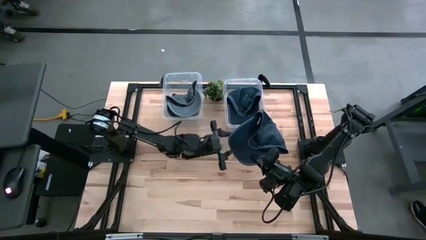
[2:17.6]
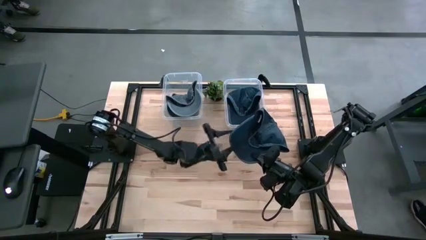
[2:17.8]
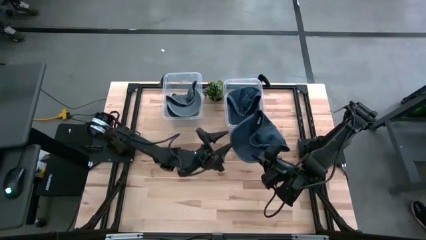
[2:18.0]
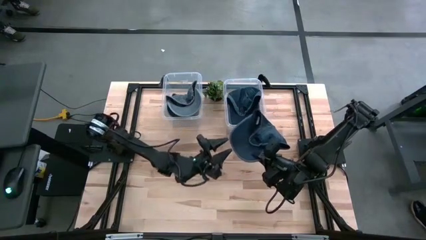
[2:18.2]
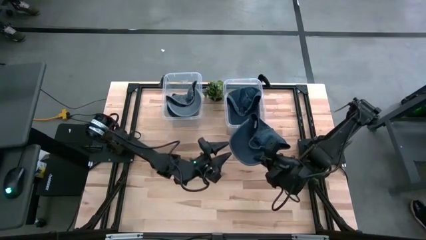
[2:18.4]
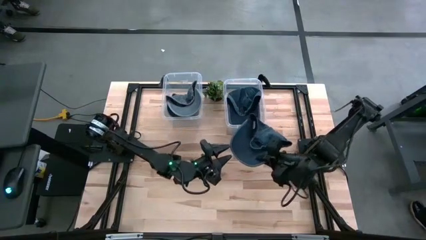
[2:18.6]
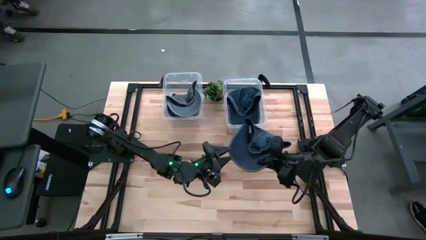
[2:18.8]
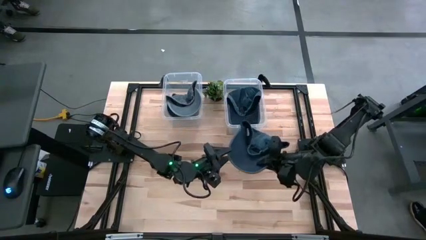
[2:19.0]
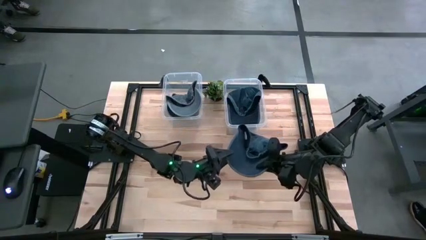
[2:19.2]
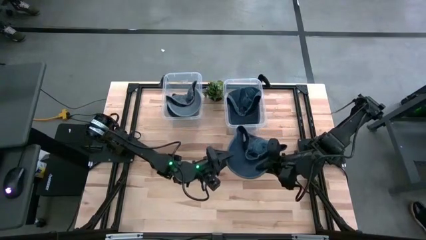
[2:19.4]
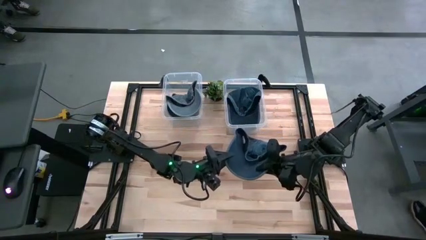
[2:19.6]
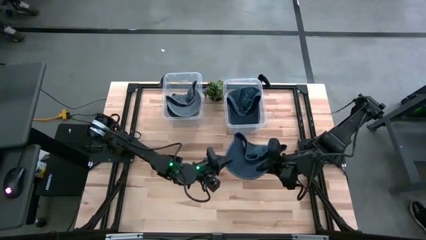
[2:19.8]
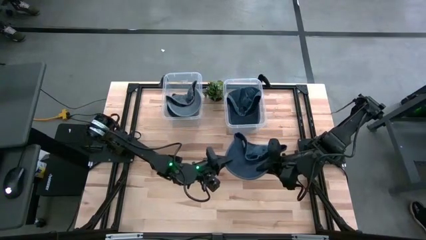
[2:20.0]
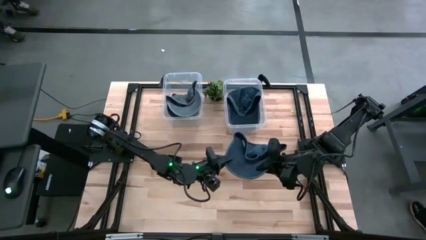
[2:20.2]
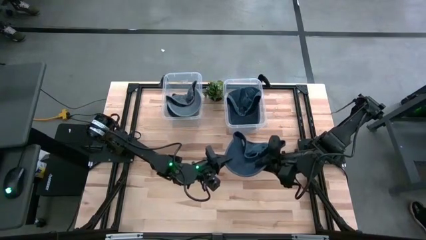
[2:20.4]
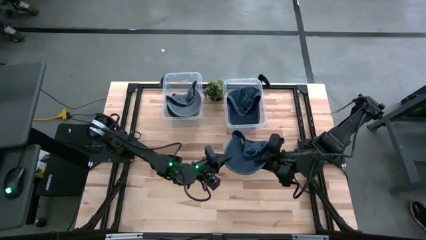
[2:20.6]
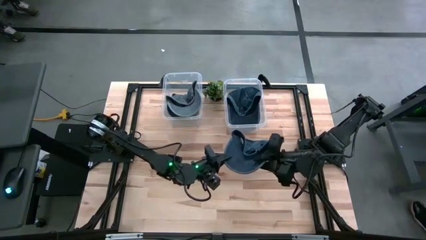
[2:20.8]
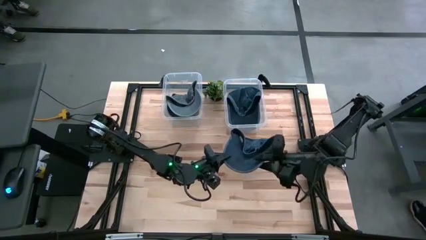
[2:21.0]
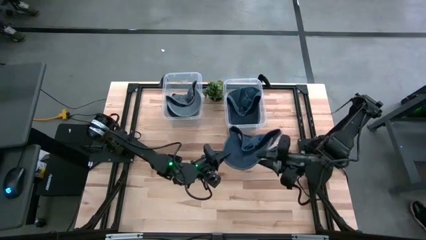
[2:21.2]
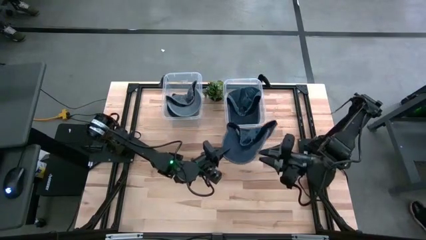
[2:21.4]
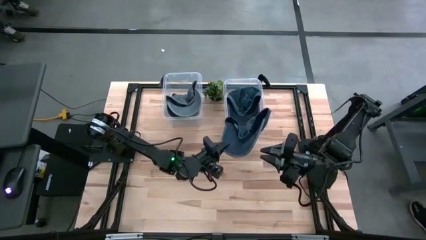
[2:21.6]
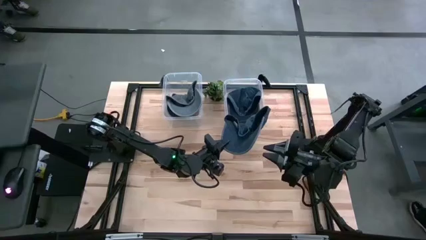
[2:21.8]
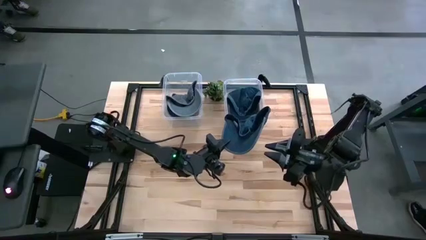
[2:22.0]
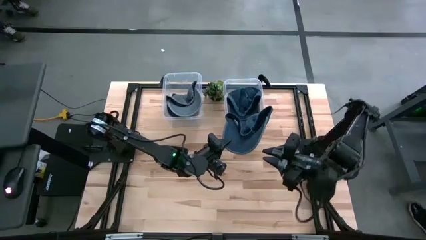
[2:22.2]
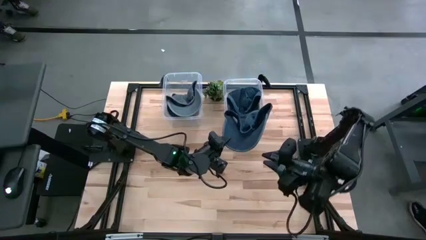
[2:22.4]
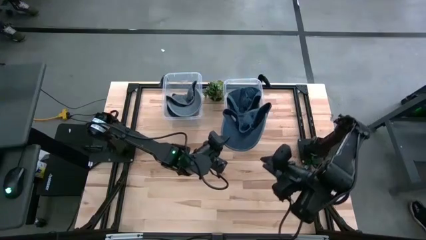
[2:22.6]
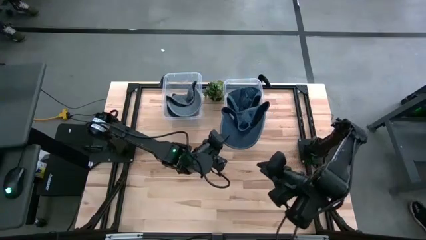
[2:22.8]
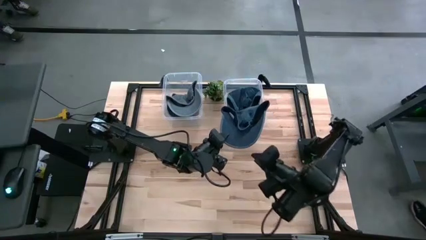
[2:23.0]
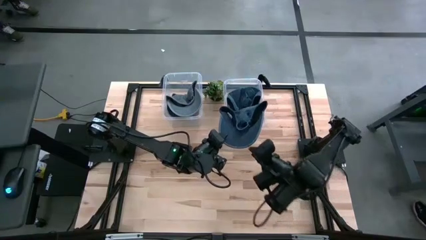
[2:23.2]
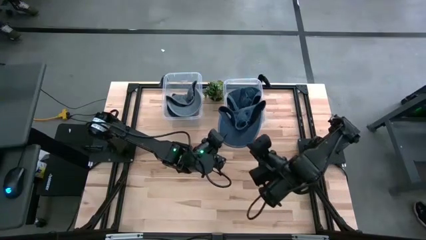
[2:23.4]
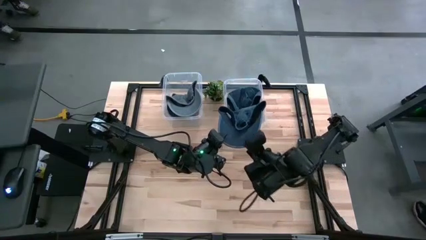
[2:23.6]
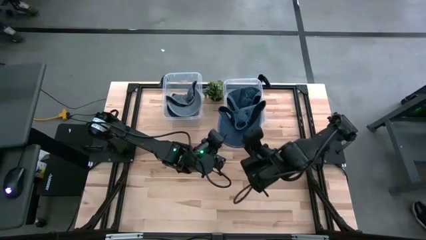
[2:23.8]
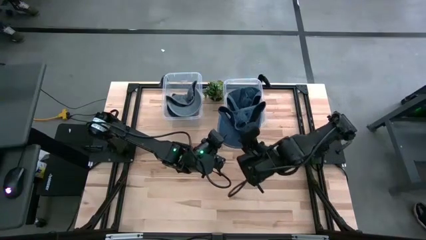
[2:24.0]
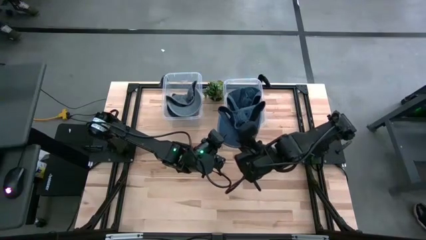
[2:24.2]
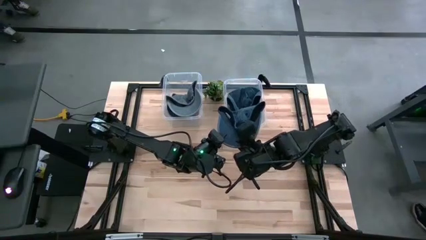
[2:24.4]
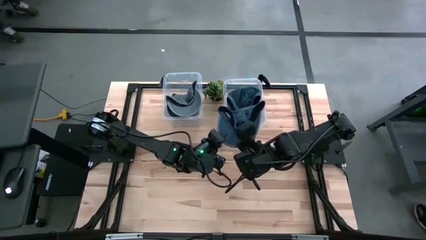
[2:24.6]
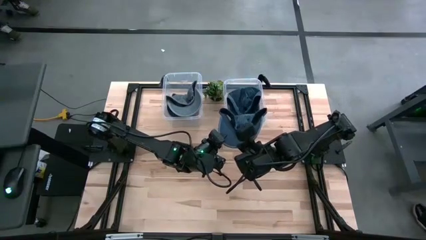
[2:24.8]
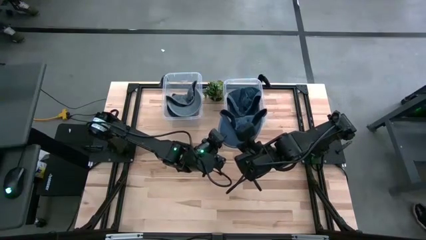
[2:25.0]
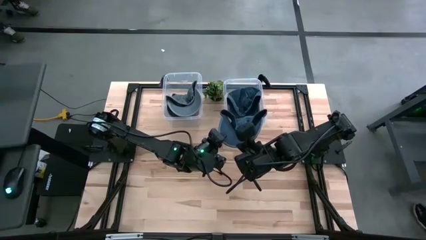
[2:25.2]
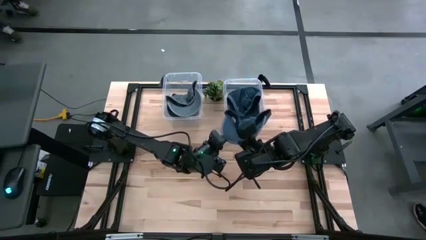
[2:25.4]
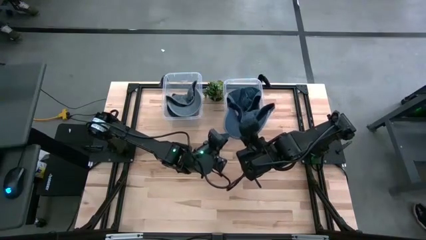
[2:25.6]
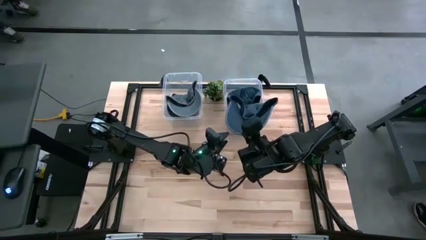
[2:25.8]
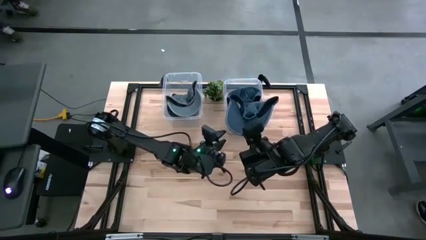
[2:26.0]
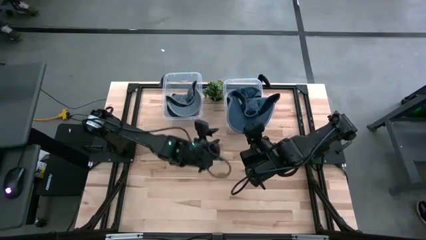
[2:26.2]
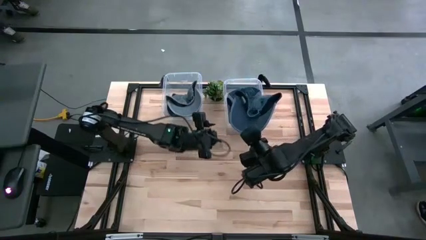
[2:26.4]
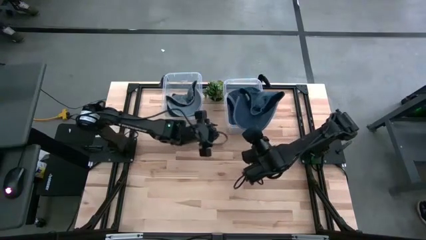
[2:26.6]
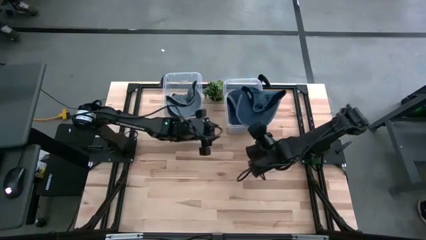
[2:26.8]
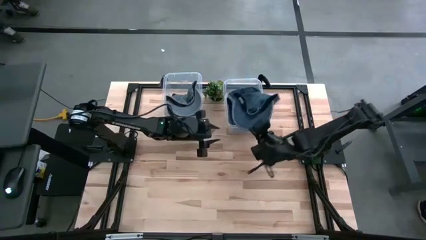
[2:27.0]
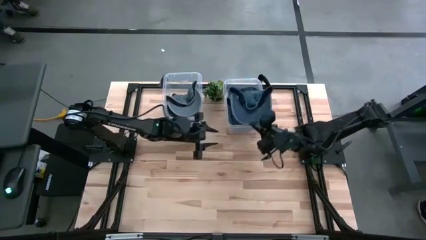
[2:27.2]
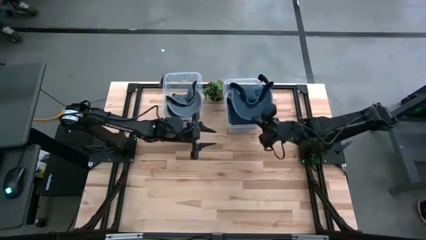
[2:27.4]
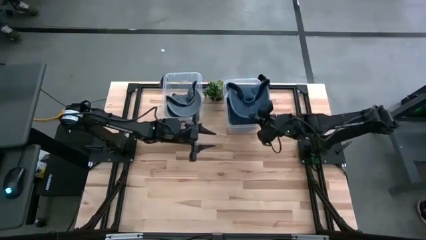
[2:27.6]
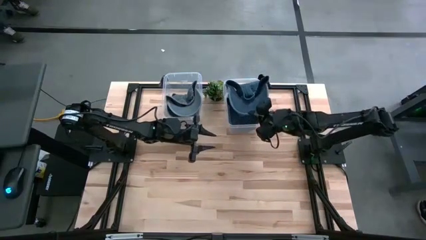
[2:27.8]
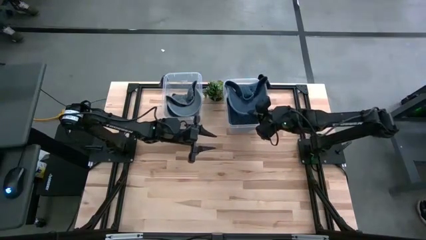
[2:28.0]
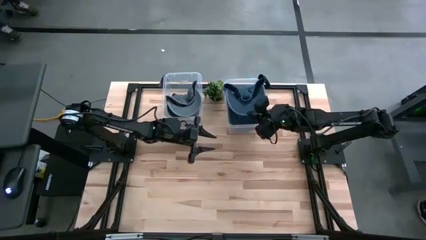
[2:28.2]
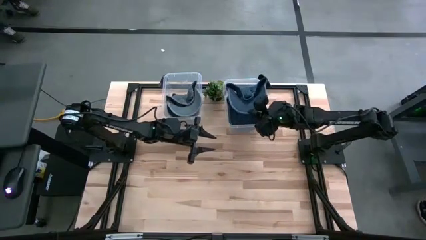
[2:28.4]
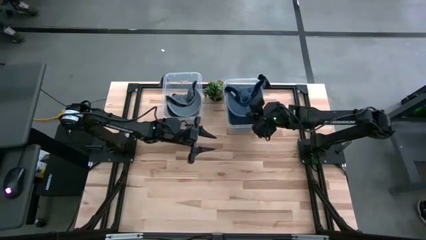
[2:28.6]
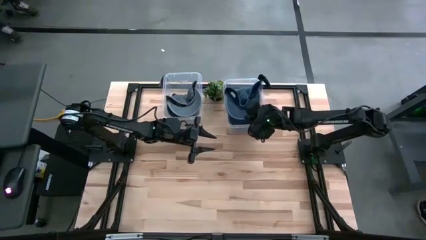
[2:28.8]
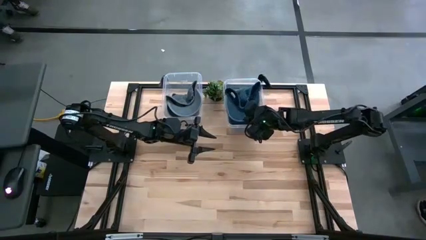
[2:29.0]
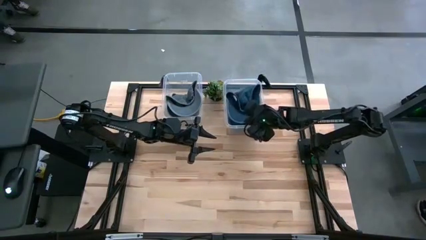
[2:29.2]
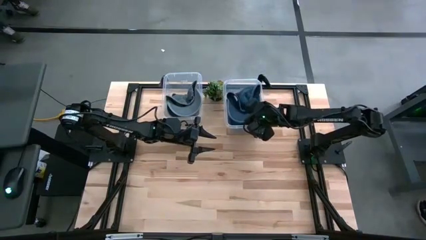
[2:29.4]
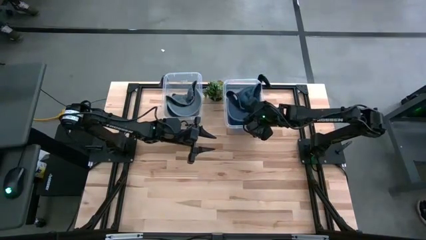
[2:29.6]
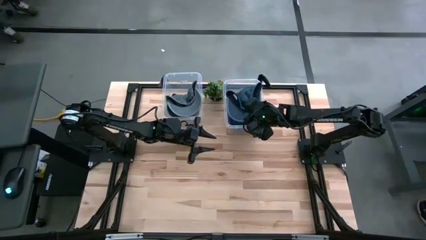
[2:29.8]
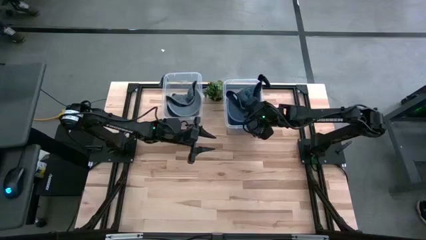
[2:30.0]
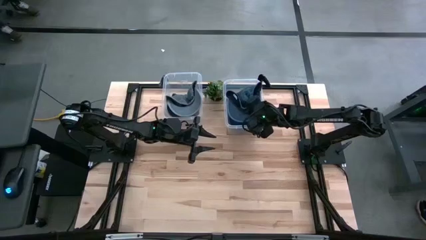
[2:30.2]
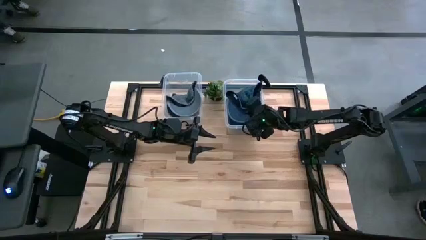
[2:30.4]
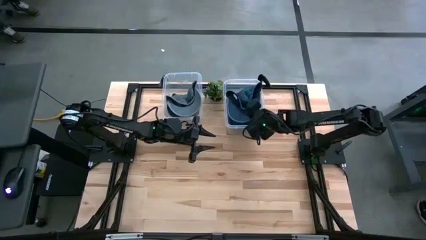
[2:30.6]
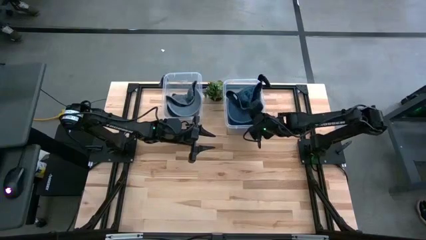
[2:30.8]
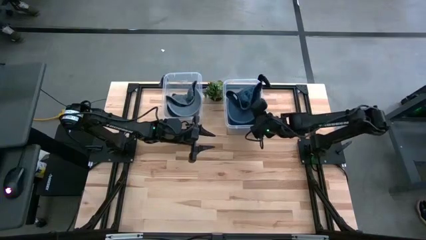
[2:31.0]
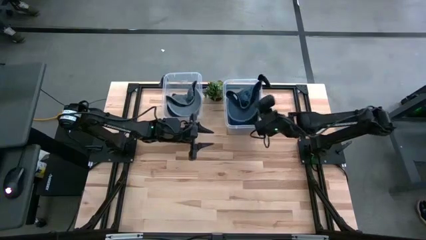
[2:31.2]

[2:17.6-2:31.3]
Task: Pick & Place hat
Put the blue cap into the right transparent bin

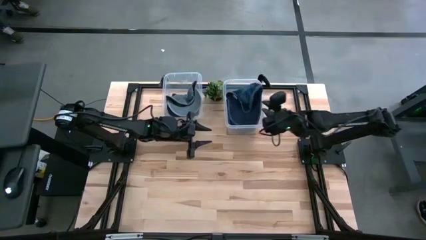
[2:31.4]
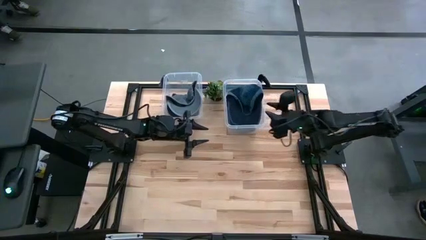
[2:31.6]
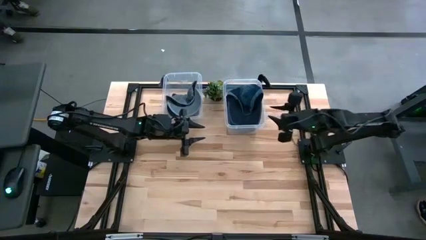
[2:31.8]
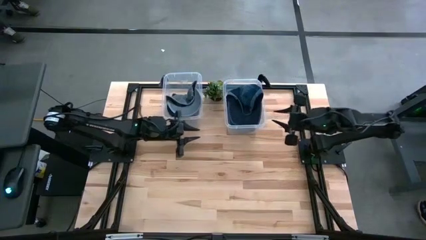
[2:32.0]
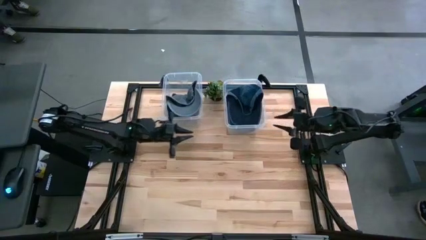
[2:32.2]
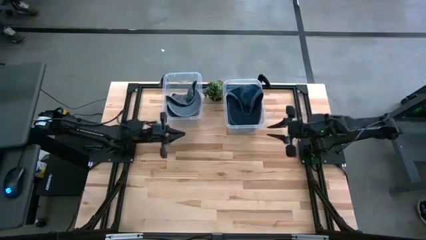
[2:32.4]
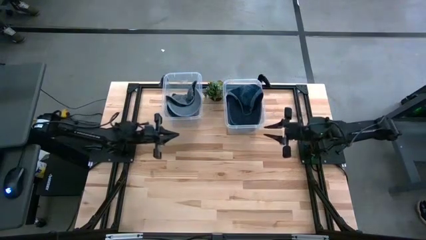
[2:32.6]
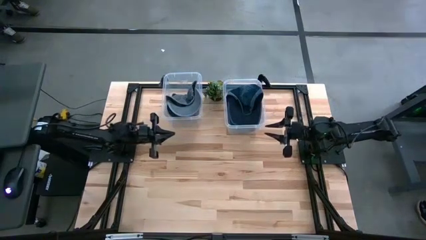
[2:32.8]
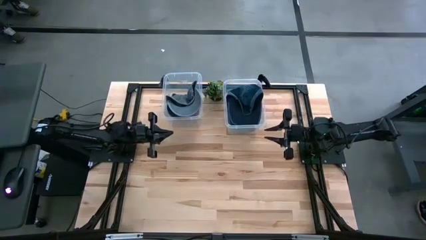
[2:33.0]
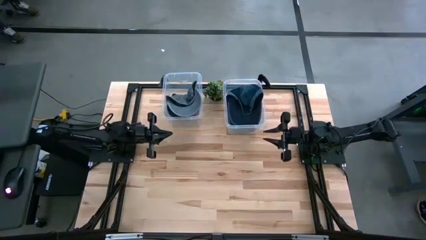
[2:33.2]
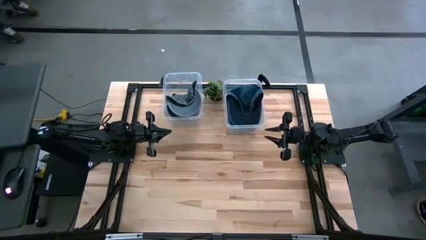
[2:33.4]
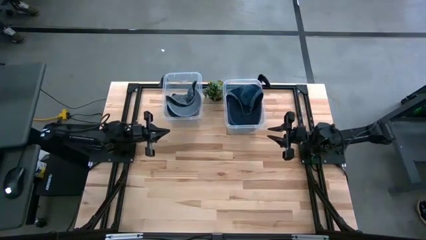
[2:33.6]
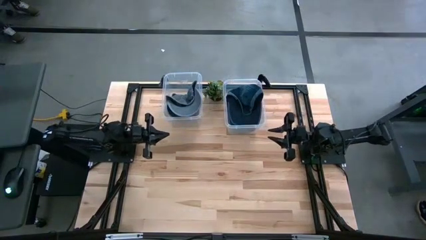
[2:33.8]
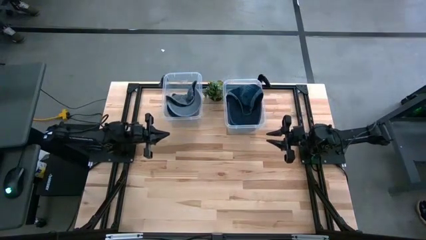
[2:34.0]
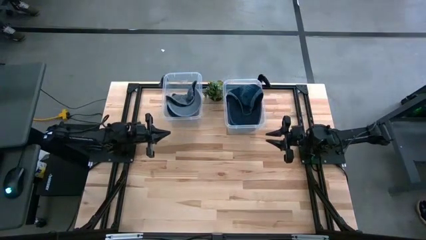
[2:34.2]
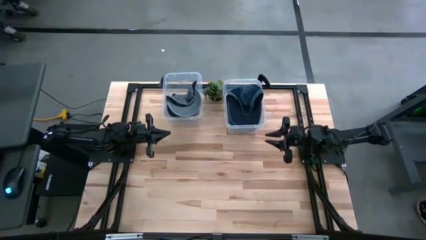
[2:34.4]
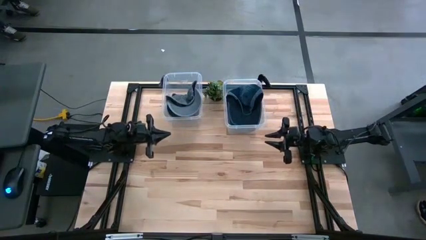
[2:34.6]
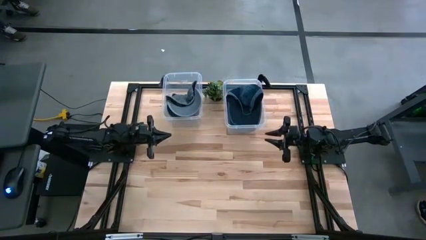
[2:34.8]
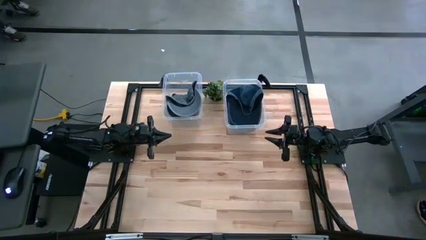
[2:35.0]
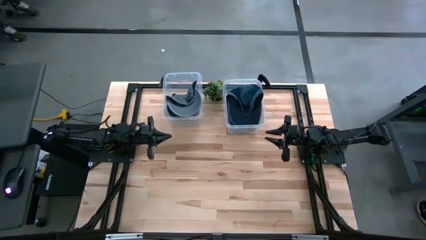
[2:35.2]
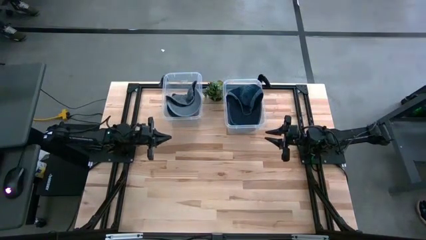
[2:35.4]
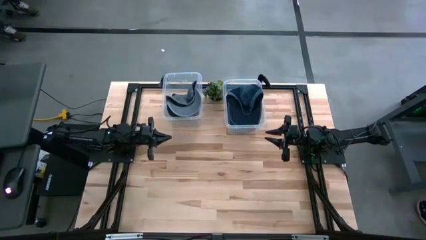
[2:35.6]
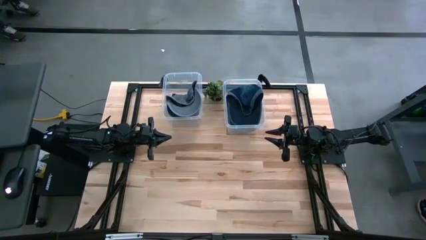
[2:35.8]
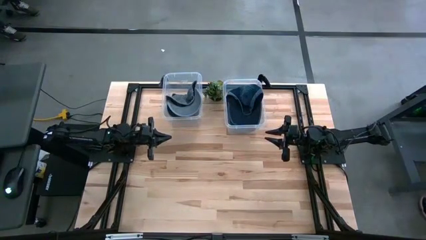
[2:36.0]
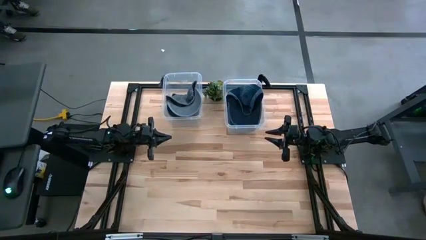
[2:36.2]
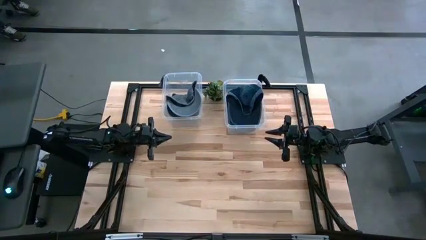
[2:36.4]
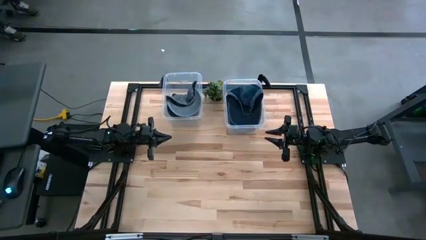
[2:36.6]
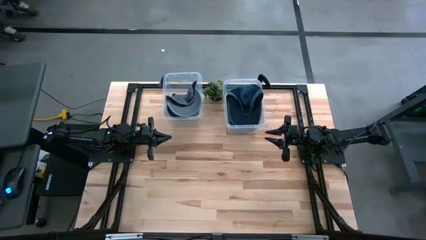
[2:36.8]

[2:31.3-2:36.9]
Return to Home Position
